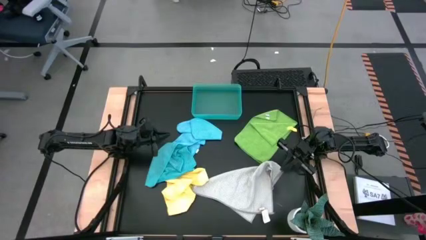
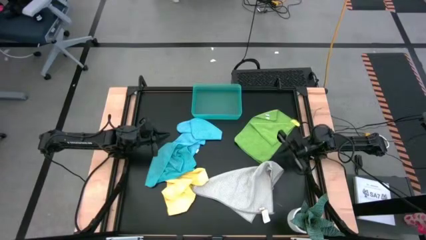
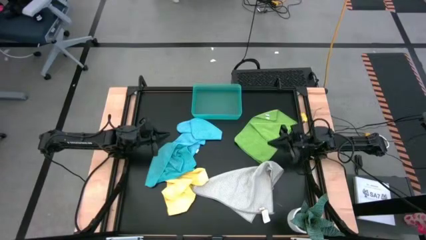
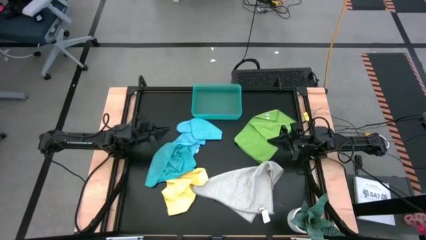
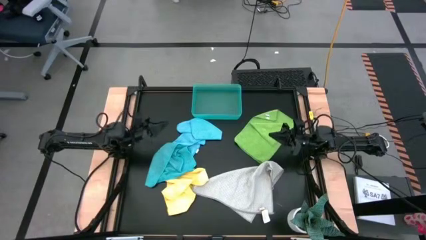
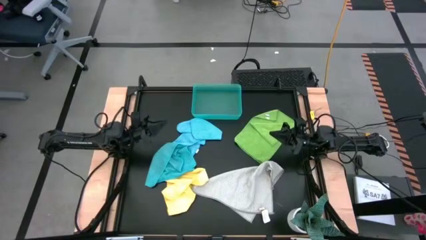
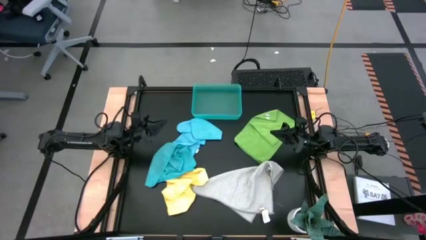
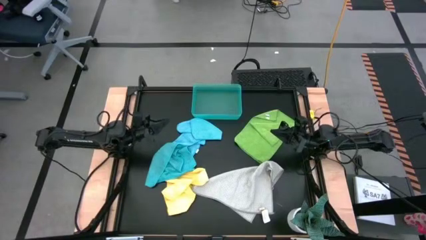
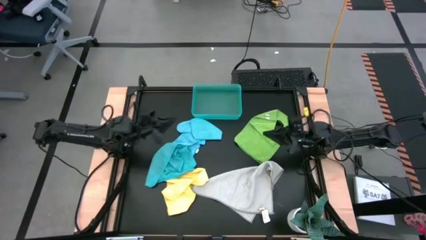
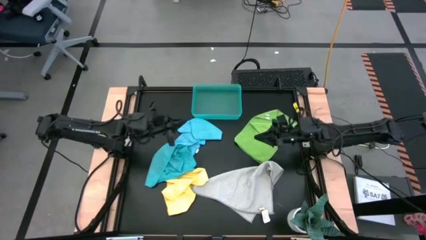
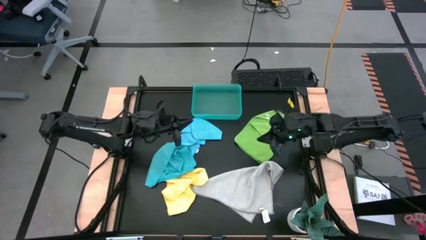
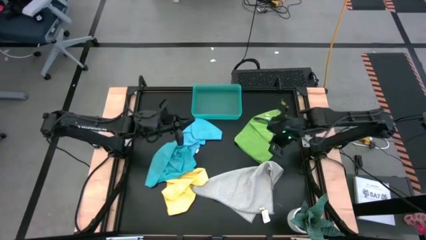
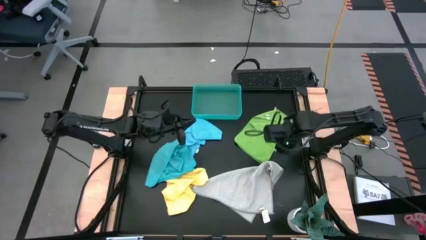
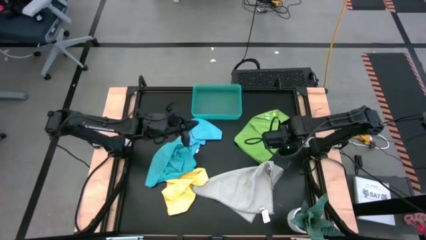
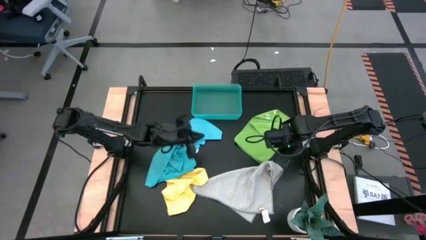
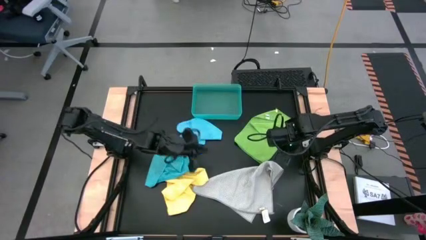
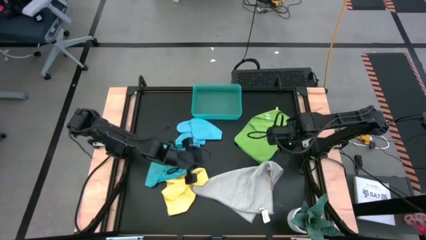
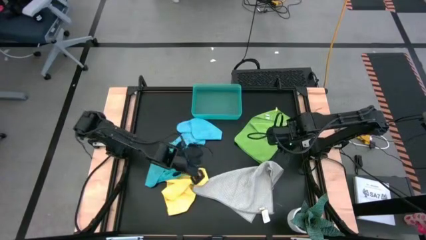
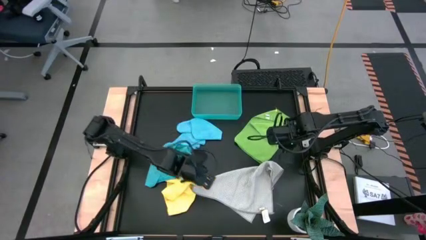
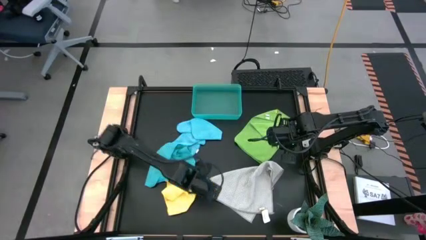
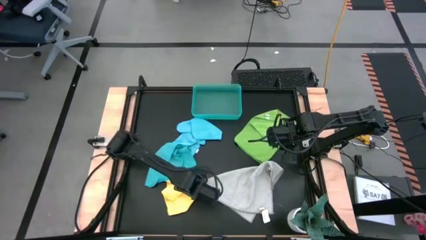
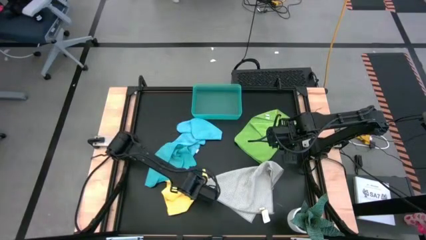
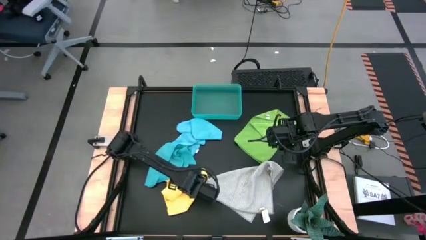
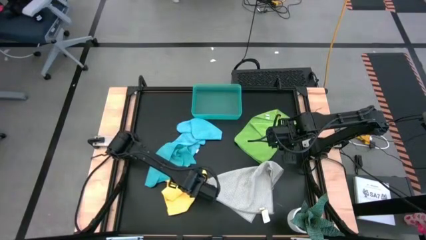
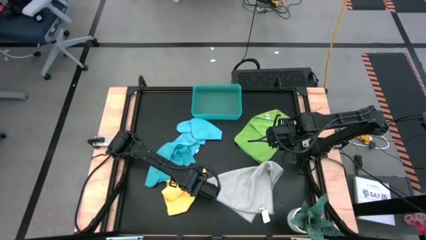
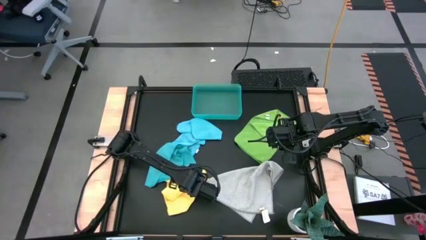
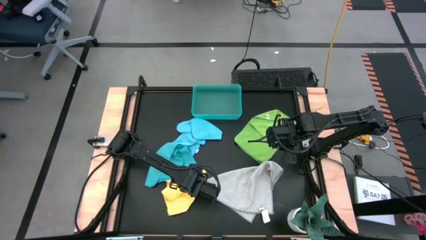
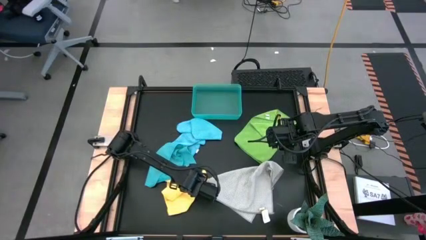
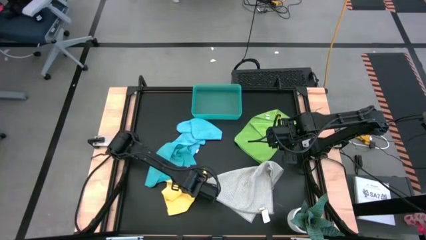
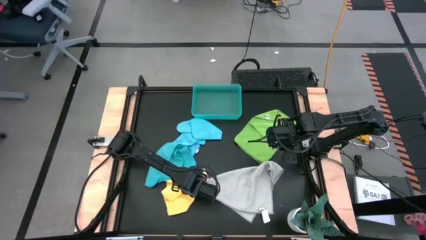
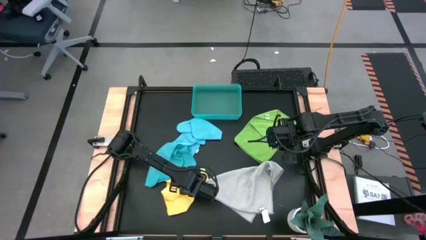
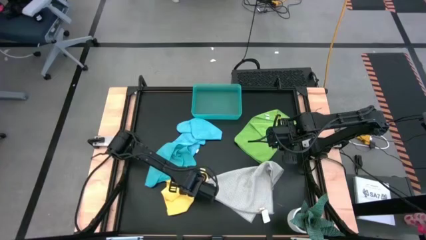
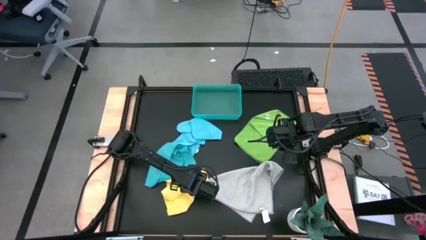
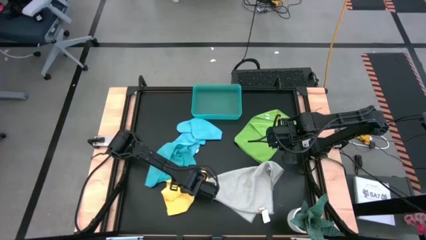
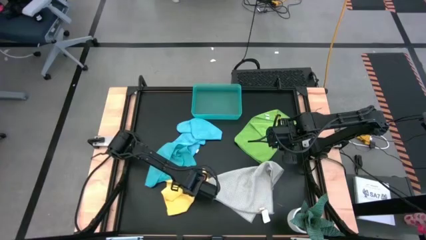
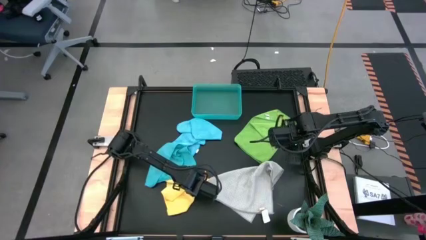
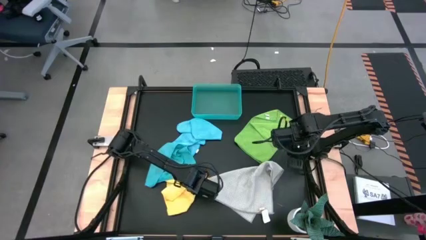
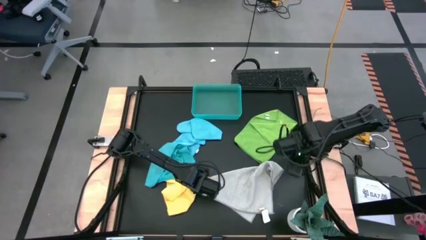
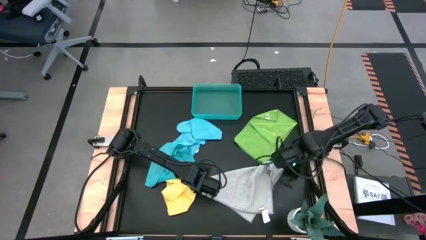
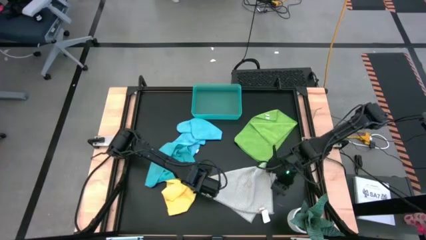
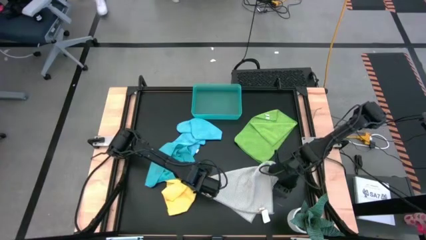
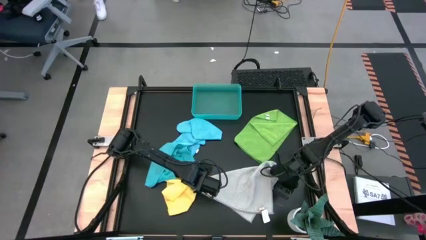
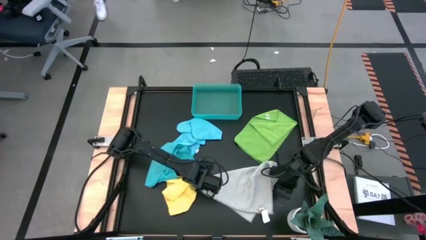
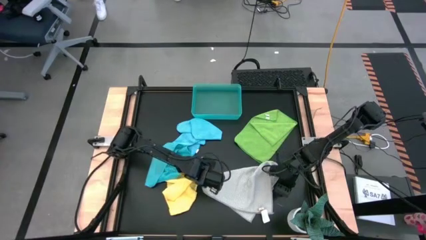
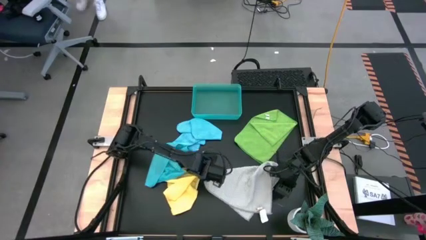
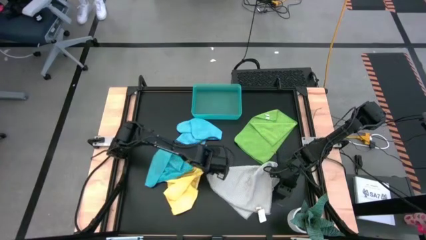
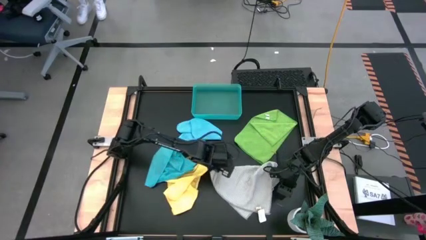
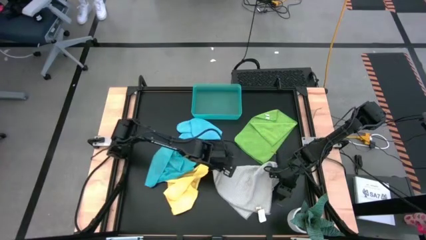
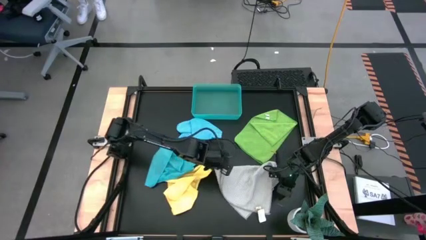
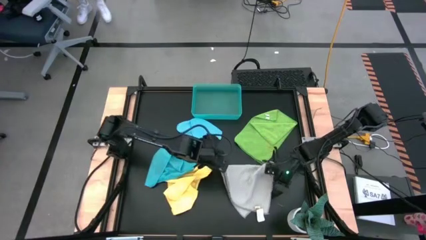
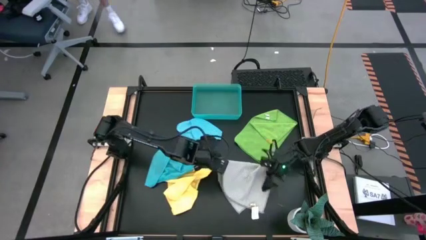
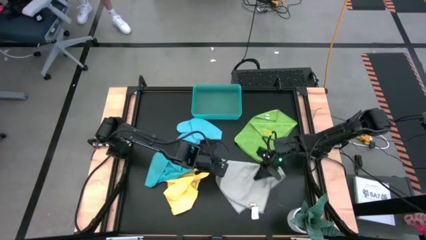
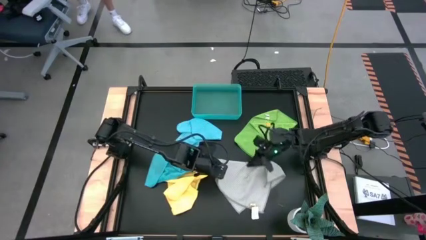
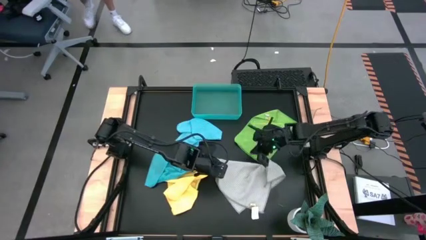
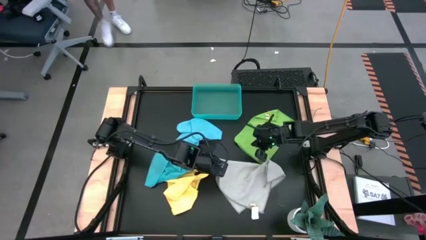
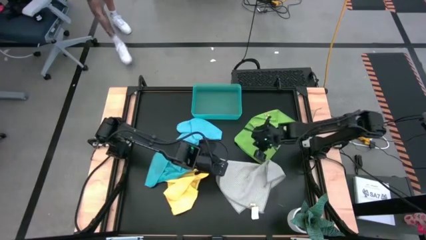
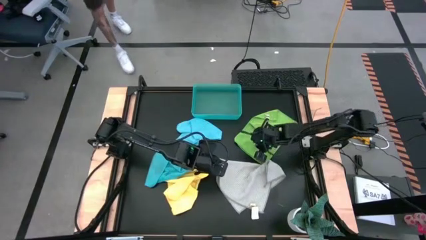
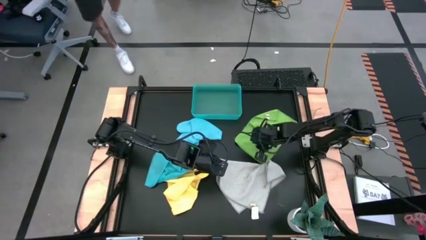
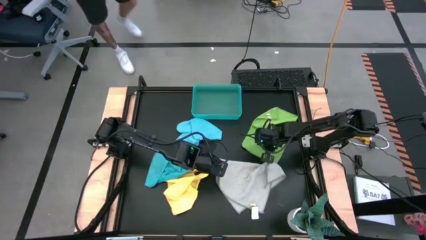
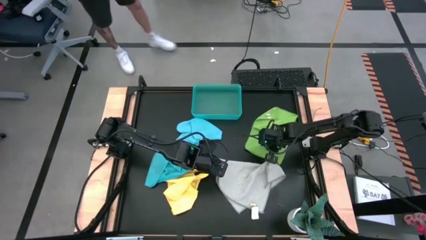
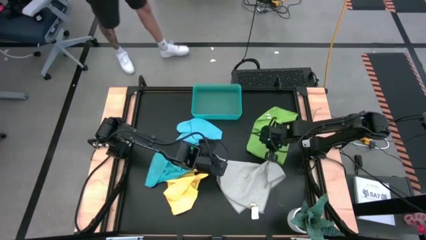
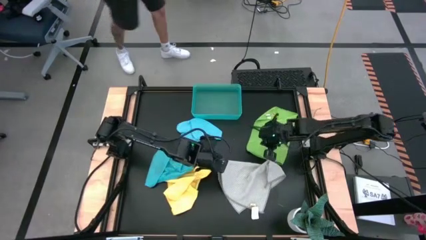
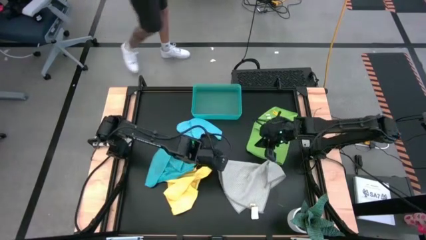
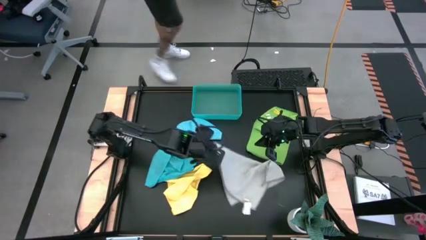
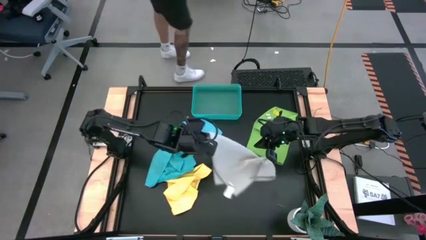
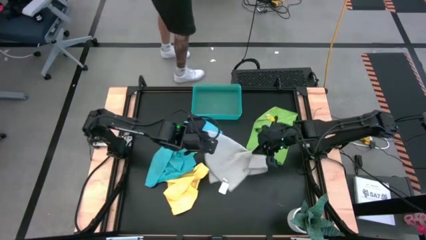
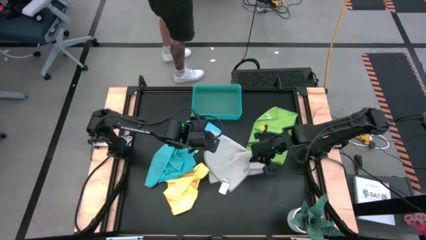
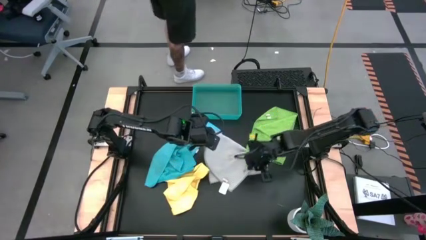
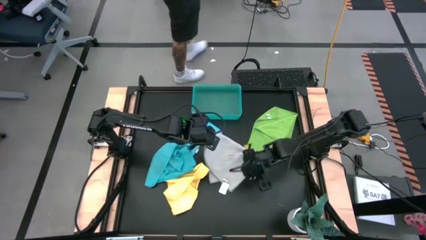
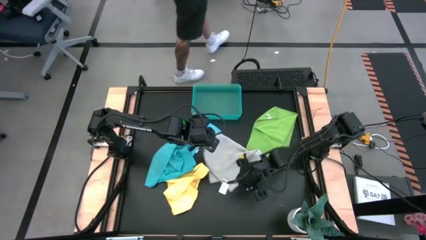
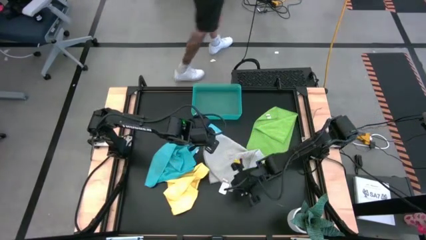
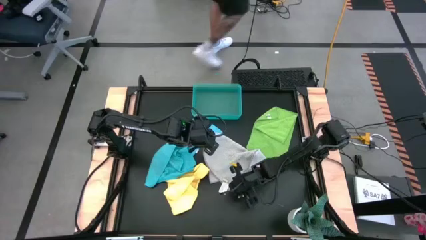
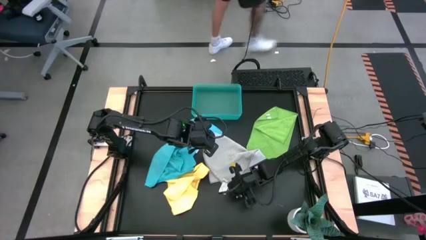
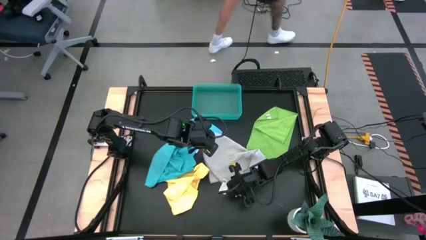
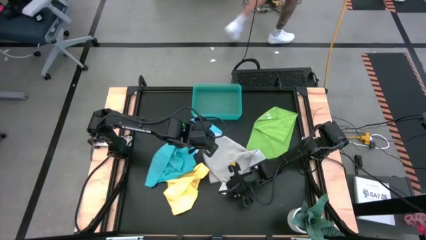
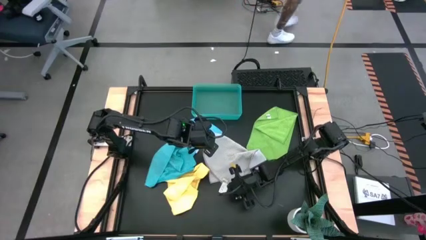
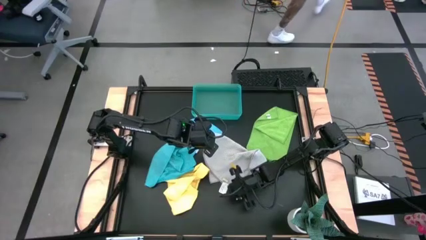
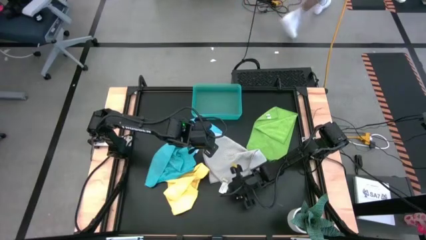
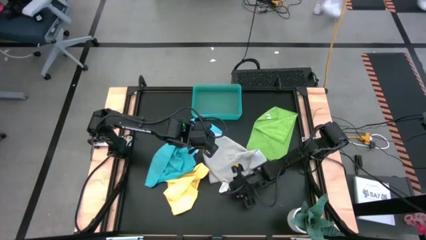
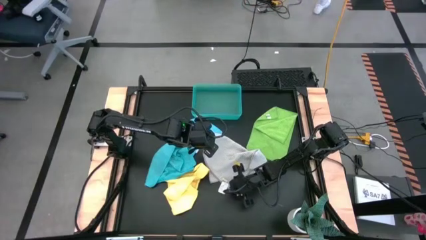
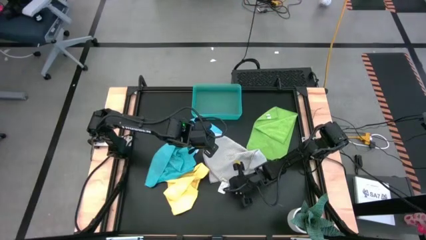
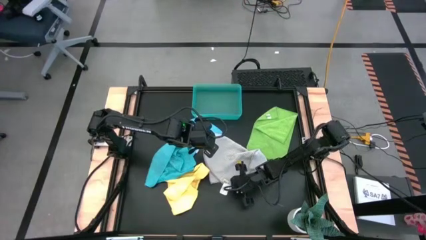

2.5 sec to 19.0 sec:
Task: Fold microfiber towels
Fold the gray microfiber towel
